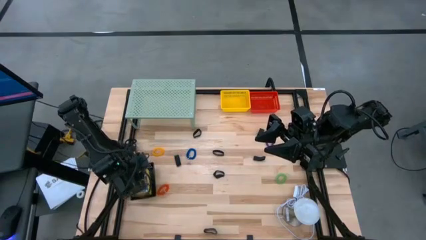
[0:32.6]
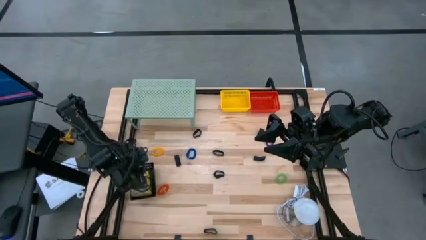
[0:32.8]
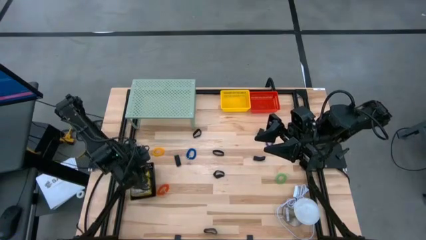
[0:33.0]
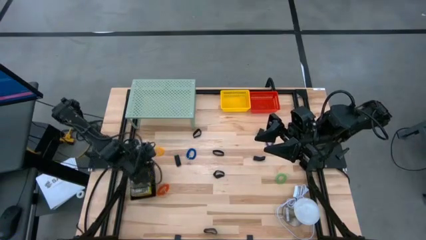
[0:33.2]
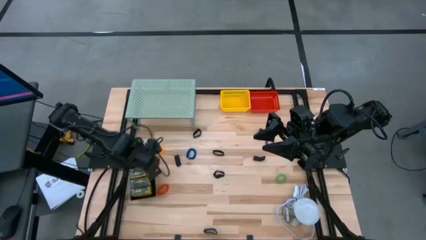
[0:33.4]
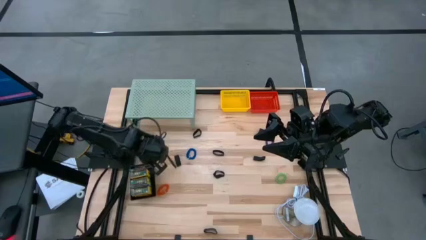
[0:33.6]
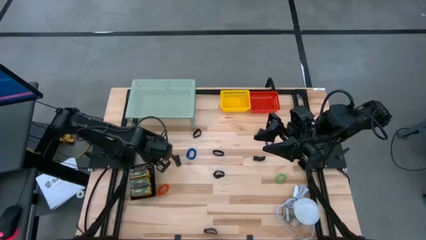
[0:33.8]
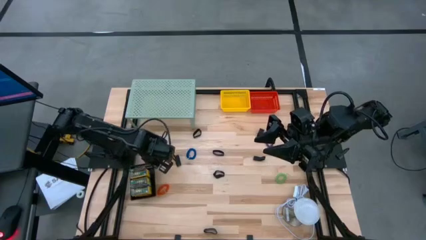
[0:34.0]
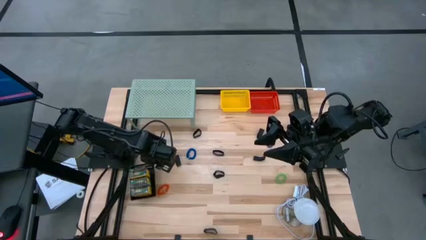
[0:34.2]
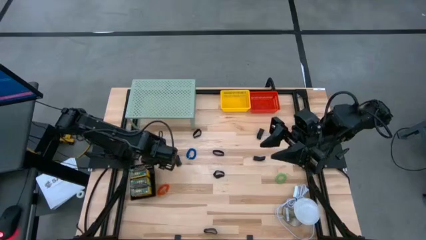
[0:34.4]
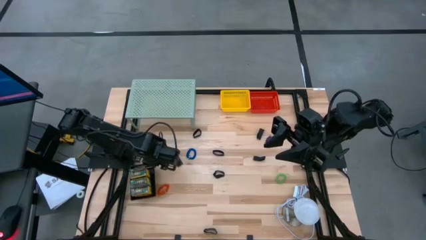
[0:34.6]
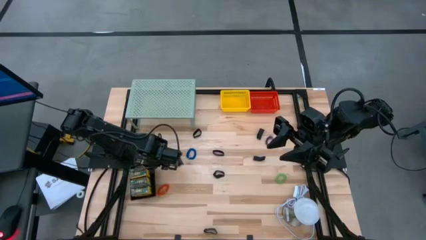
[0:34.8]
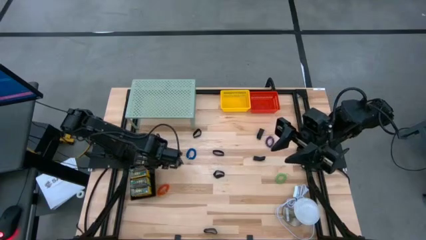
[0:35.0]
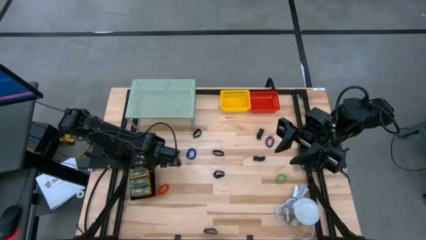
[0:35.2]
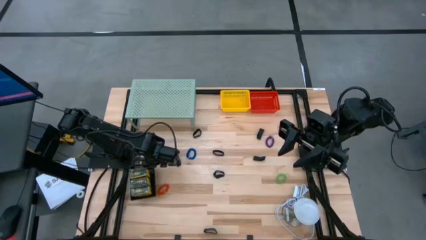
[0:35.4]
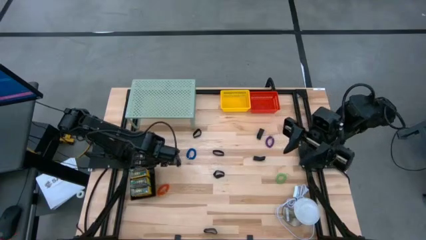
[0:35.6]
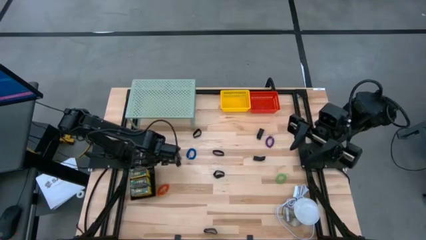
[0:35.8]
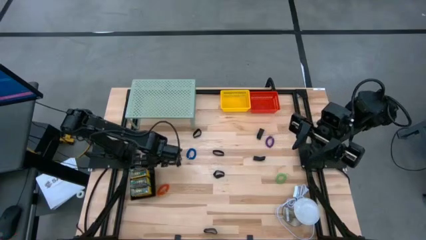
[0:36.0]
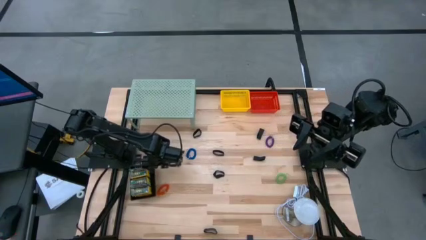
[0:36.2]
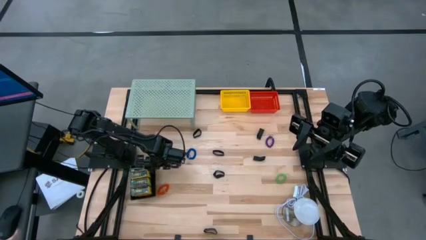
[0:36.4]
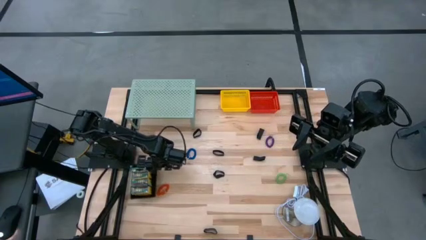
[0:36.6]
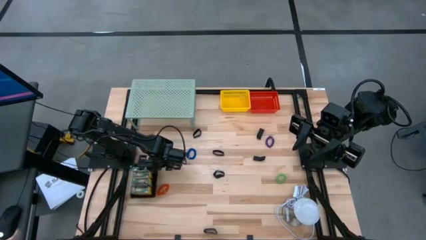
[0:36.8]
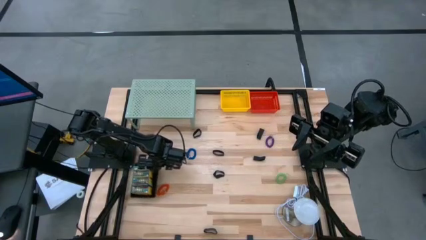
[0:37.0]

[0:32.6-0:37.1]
Task: Pick & Place Office Desk Supplies
Adjust the black basket

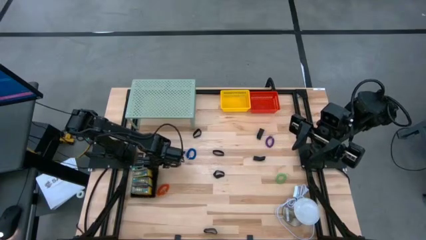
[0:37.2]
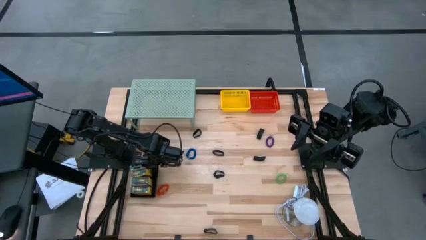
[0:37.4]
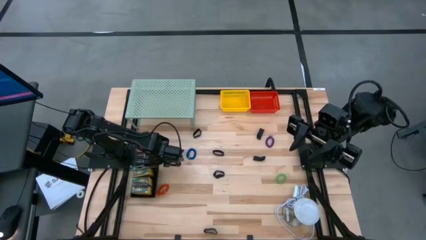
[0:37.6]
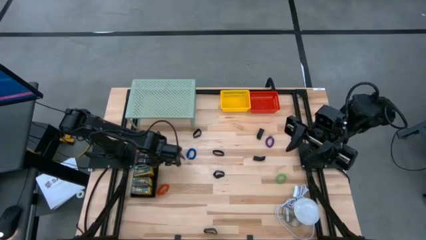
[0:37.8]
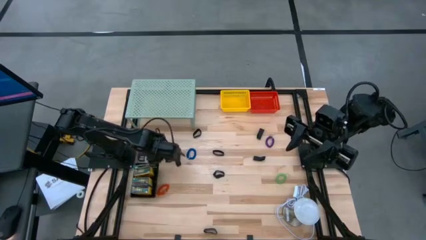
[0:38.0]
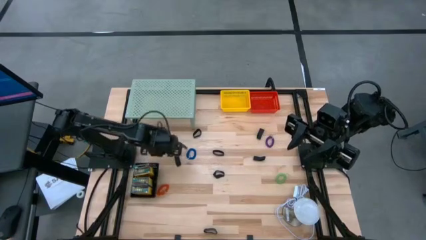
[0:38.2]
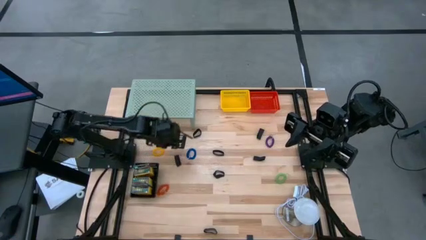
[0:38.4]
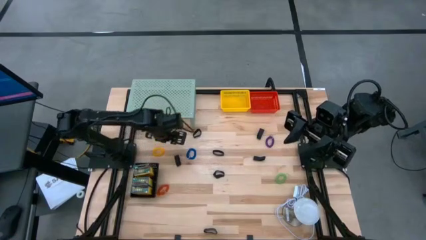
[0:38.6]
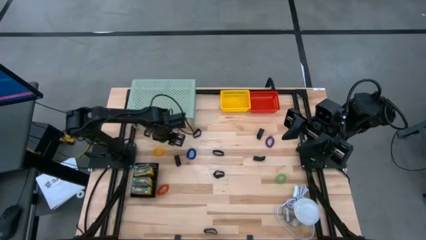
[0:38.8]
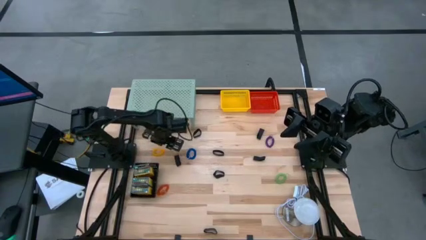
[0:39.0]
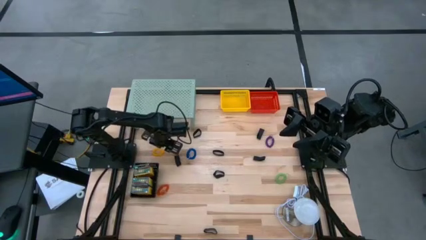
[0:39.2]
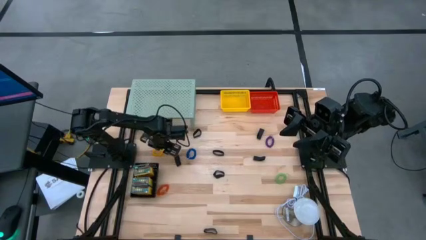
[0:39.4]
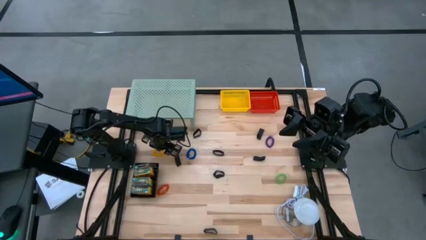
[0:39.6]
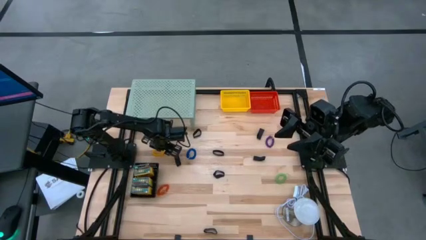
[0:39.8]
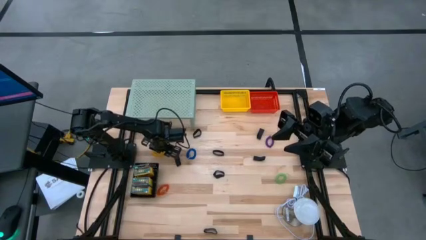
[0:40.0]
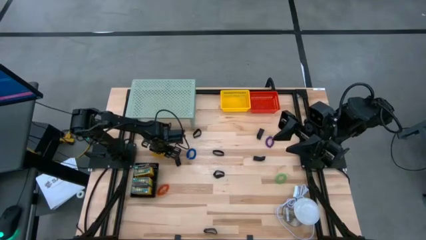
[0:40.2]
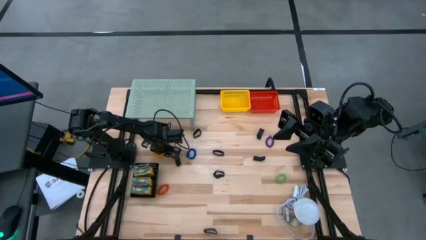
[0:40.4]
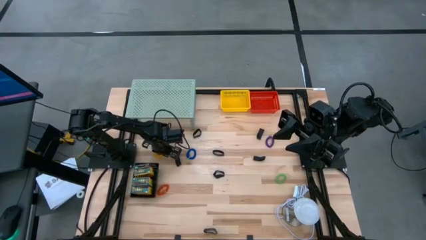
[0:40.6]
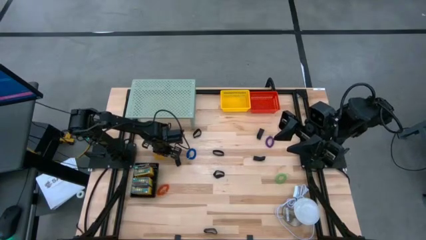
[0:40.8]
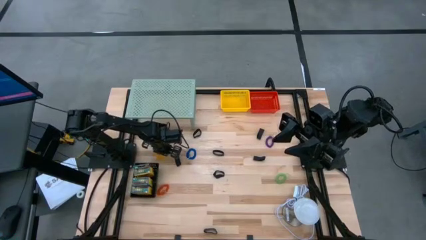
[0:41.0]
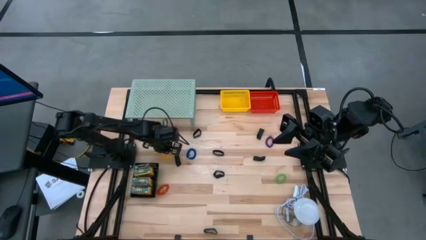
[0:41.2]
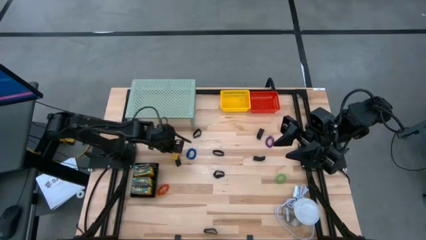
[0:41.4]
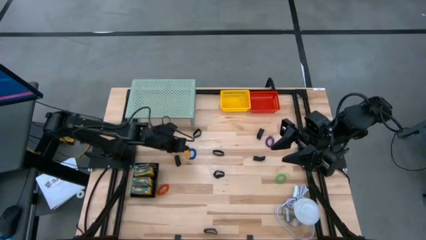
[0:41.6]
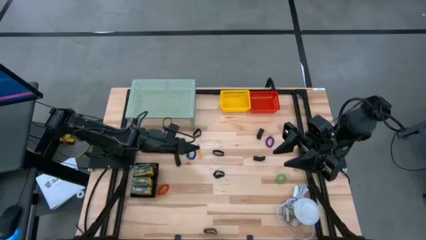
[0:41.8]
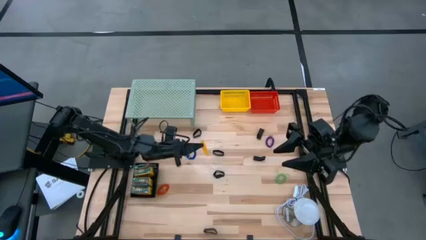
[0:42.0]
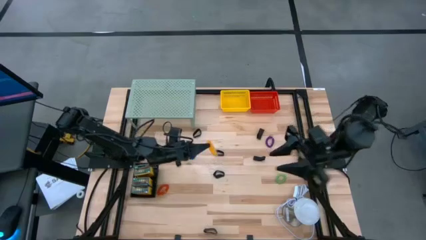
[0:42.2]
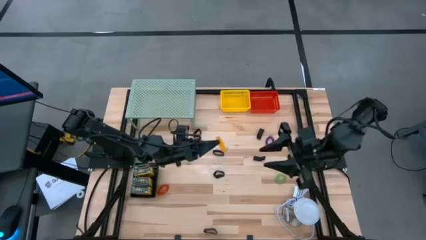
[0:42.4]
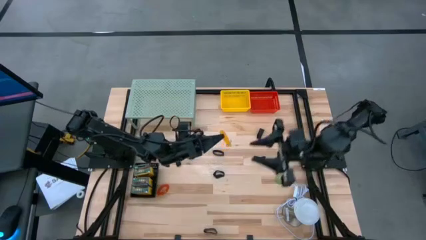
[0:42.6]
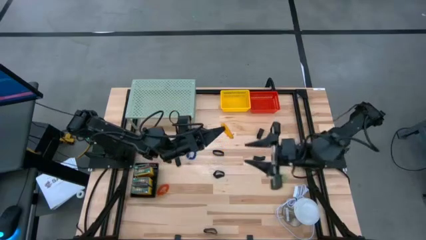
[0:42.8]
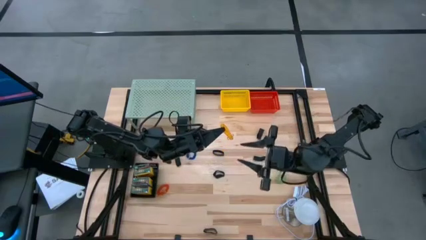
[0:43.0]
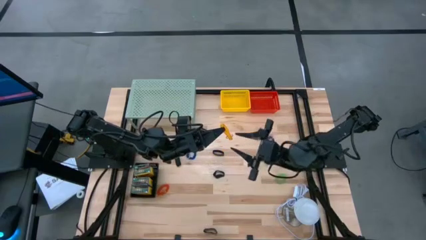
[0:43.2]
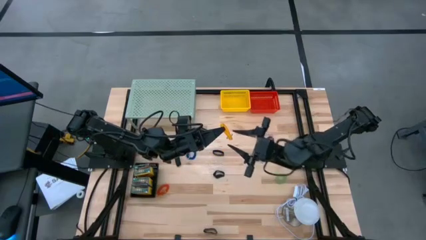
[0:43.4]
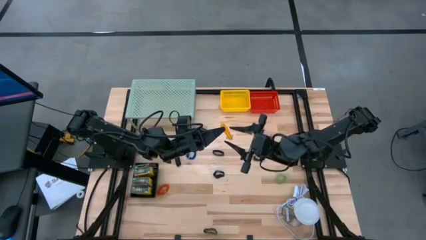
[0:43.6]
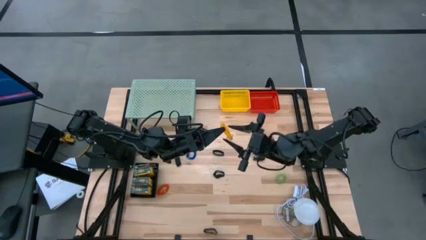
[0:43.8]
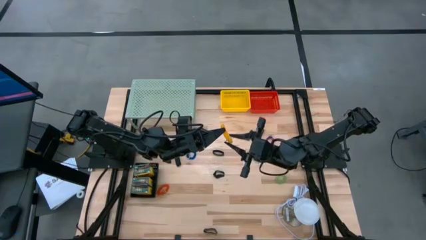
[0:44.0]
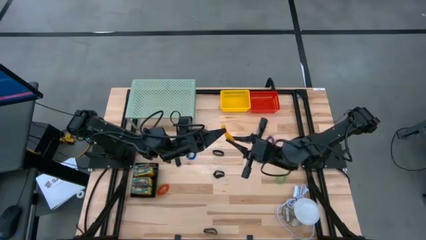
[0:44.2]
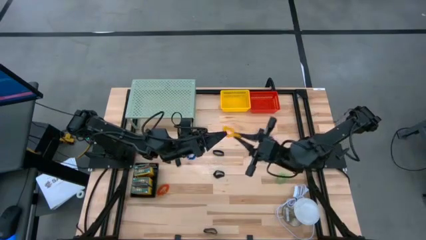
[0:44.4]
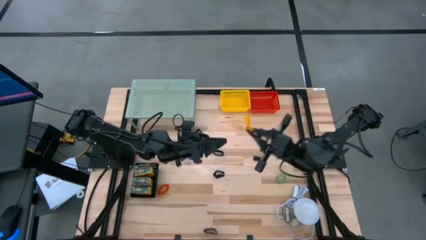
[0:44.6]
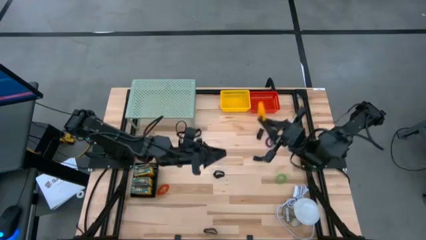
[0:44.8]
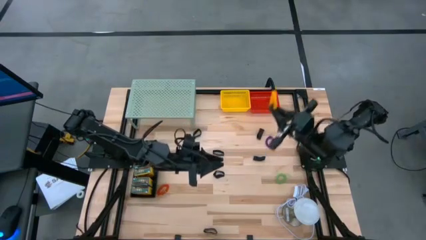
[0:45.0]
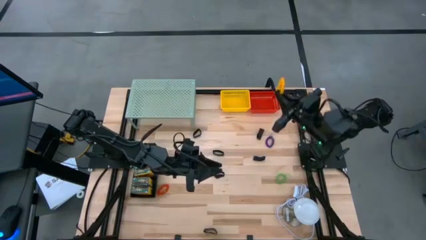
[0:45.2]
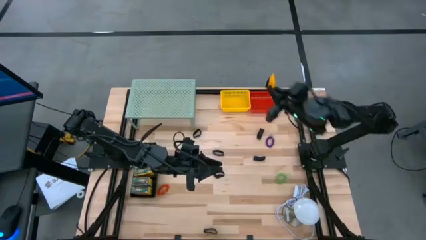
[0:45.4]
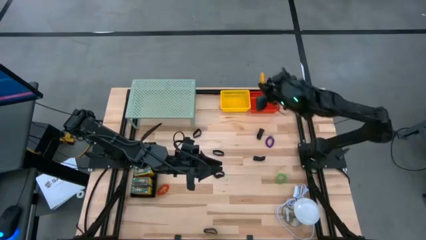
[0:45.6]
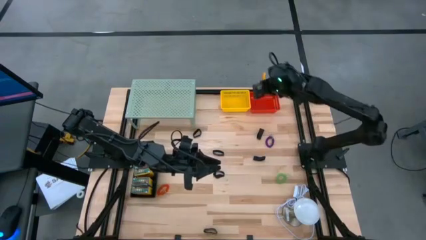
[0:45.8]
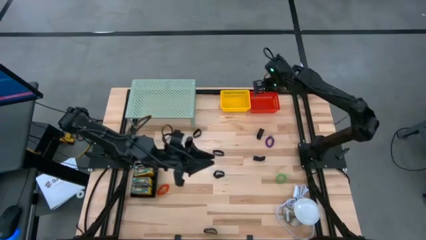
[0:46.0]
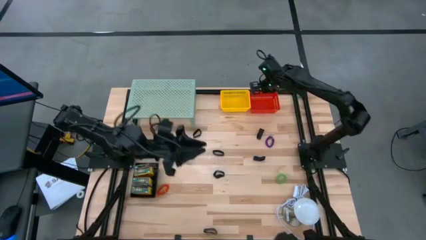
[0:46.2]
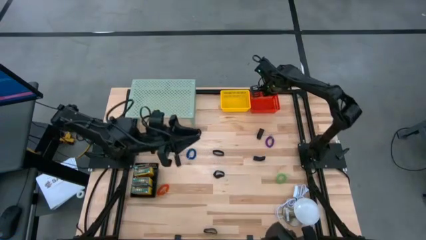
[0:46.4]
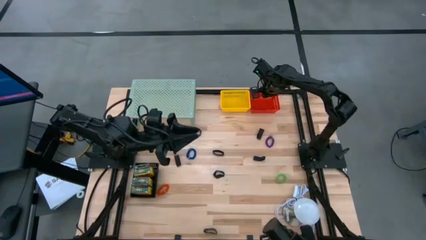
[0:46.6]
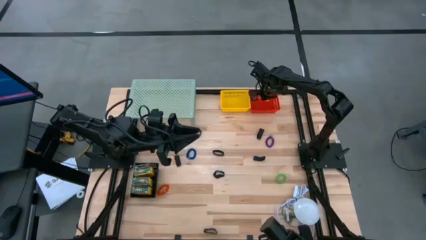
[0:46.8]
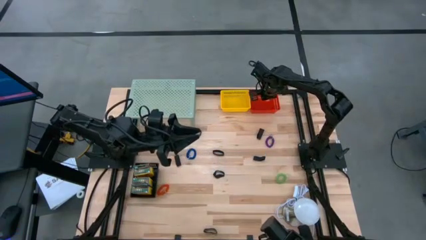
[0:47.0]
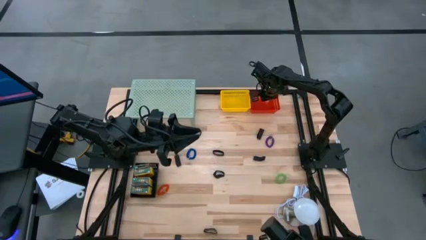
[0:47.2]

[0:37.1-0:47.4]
Put the orange spring keychain into the red basket

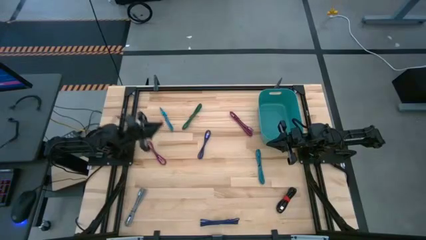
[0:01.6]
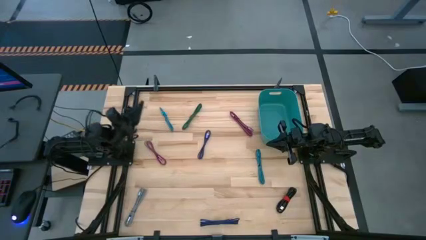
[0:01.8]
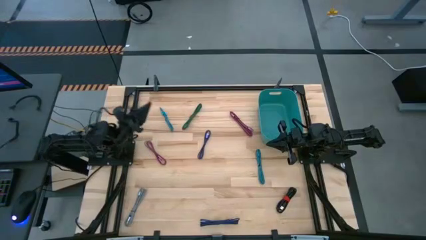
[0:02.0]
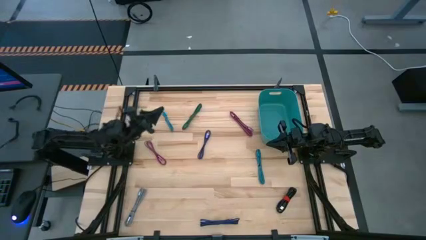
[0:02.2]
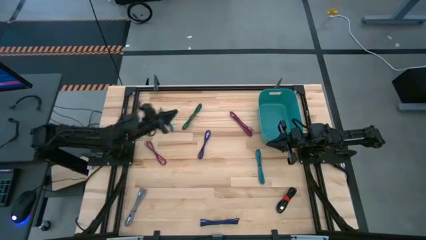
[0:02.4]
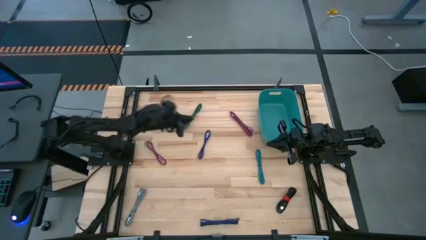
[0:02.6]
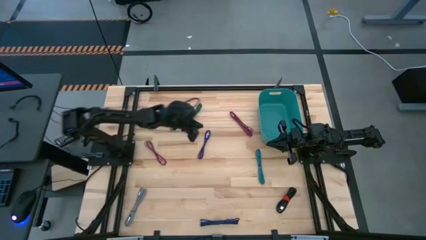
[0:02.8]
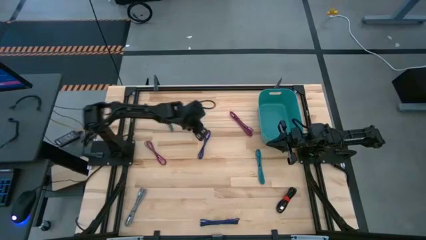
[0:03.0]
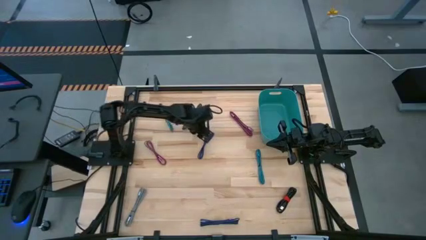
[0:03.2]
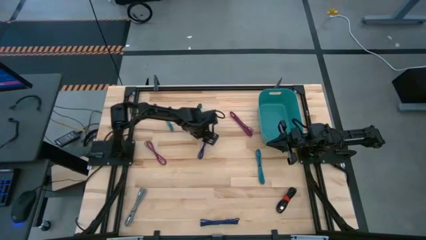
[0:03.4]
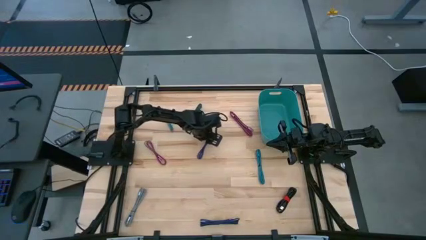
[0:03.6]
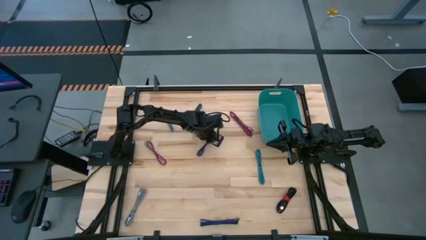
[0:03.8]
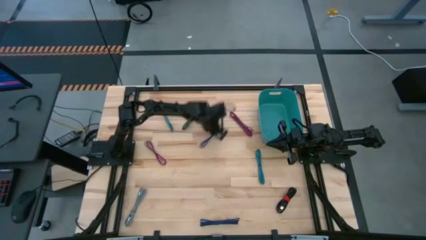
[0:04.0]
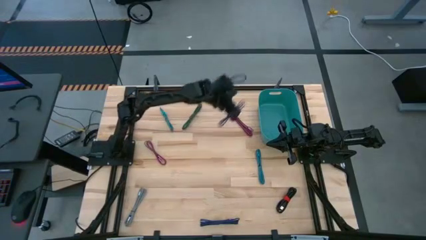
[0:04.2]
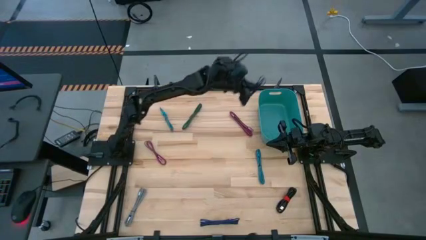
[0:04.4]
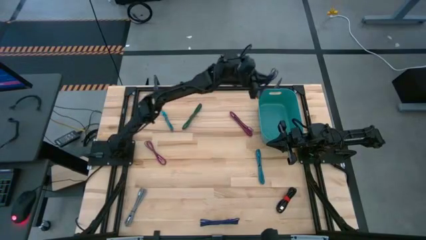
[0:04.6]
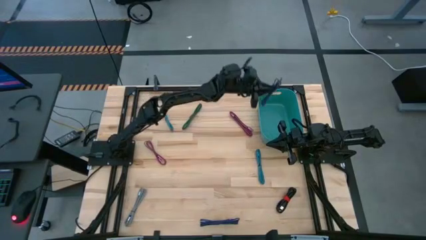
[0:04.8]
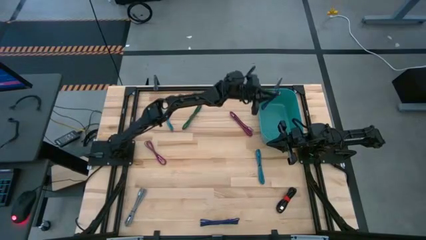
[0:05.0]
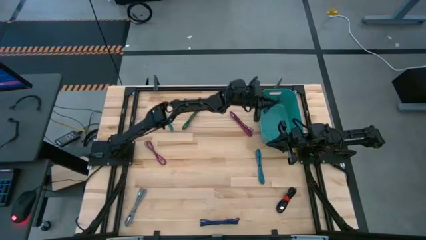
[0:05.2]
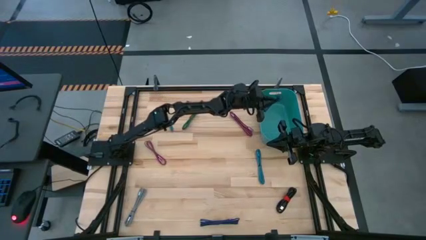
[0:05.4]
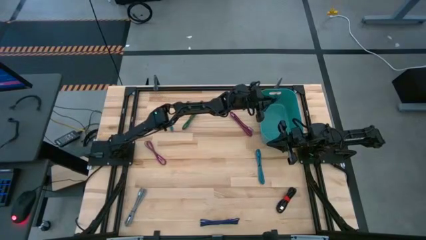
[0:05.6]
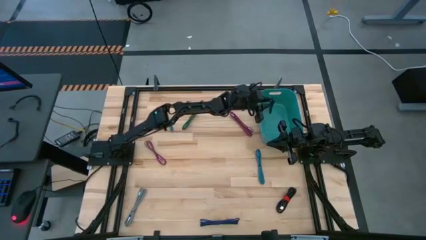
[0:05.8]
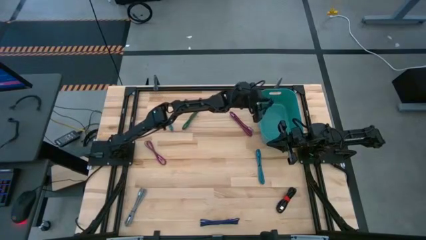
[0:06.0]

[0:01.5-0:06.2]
Task: Pick and place USB-C Cables
Put the top blue charger cable into the green bin
